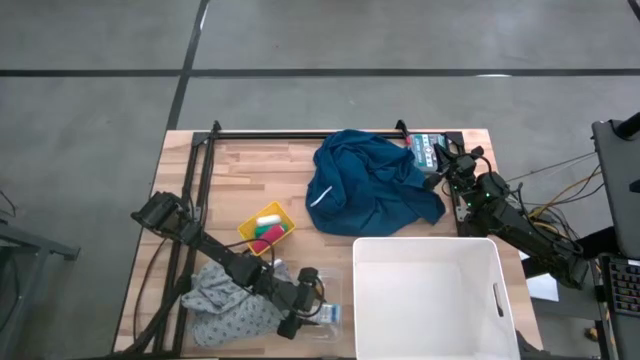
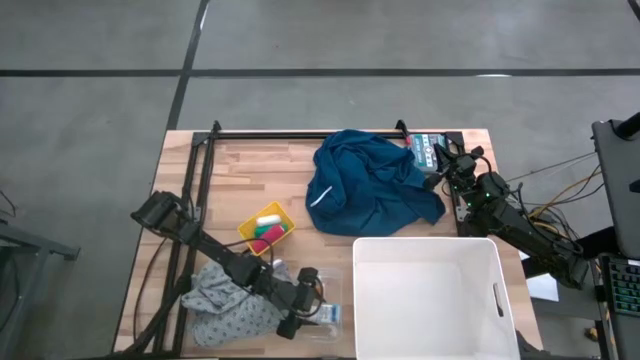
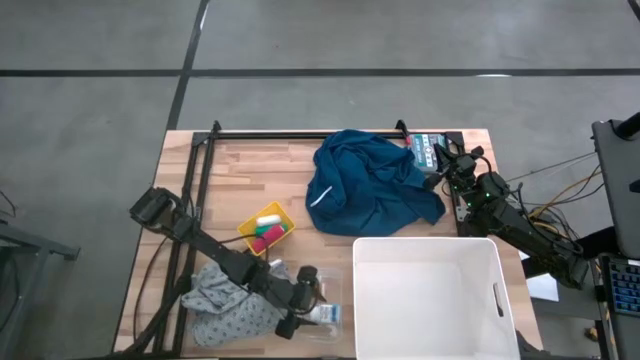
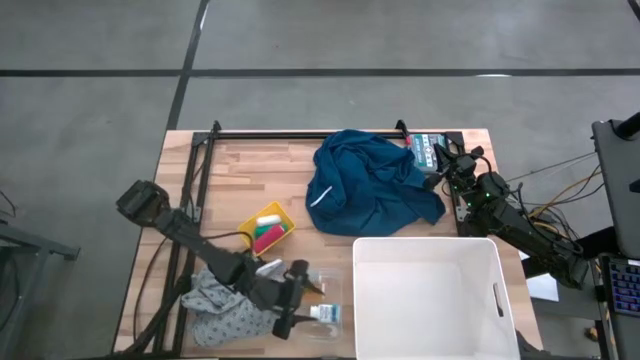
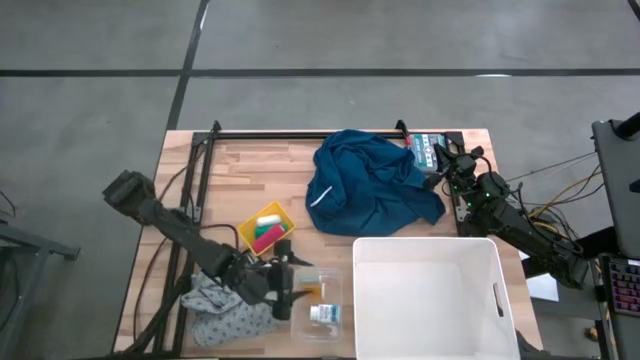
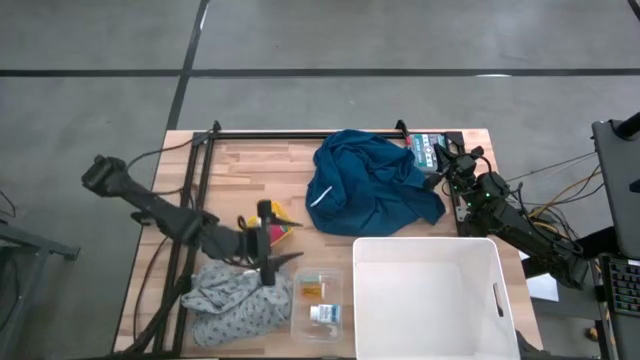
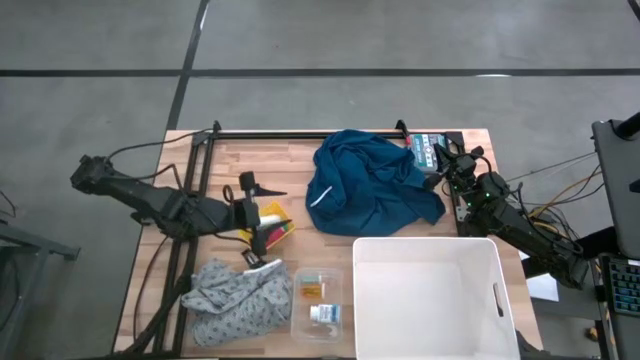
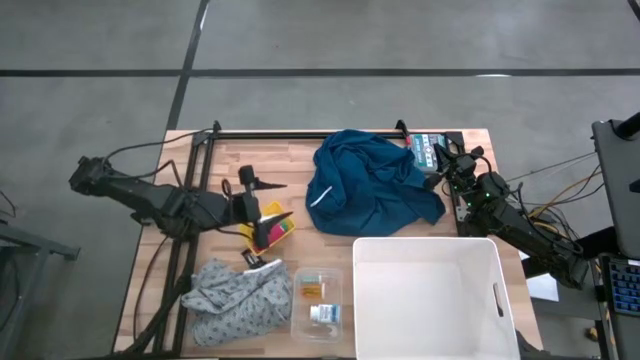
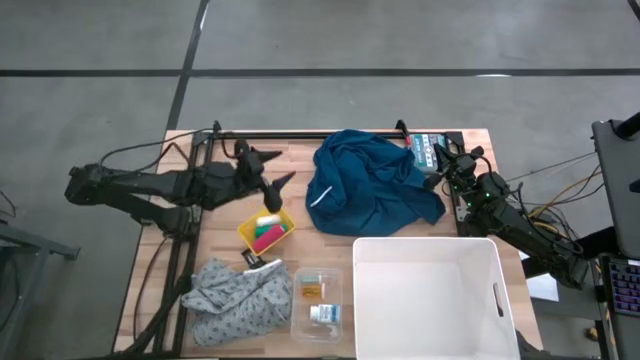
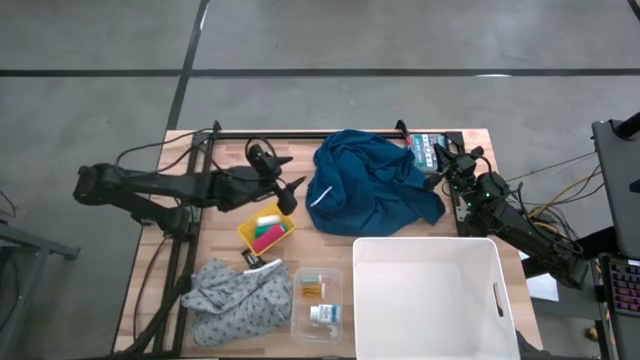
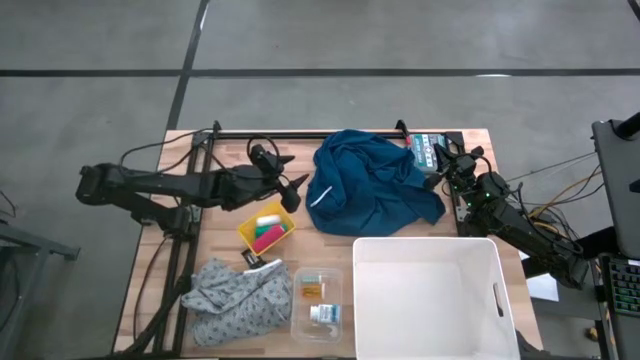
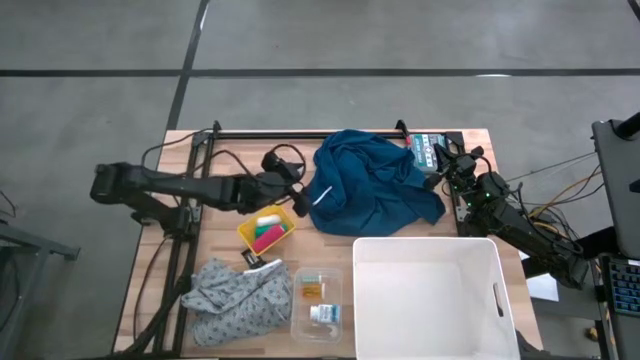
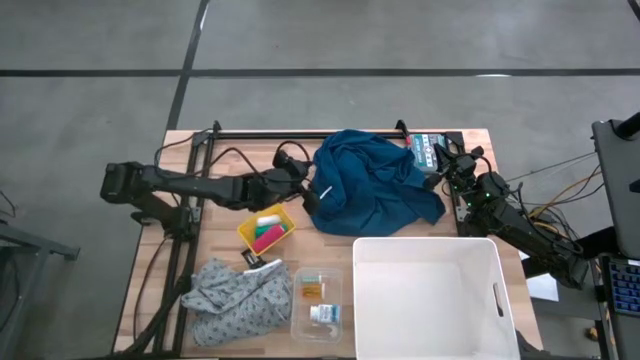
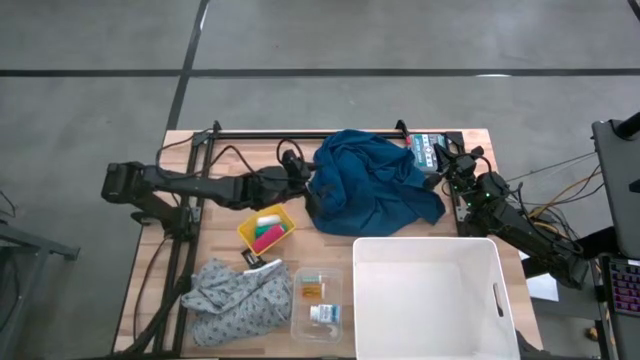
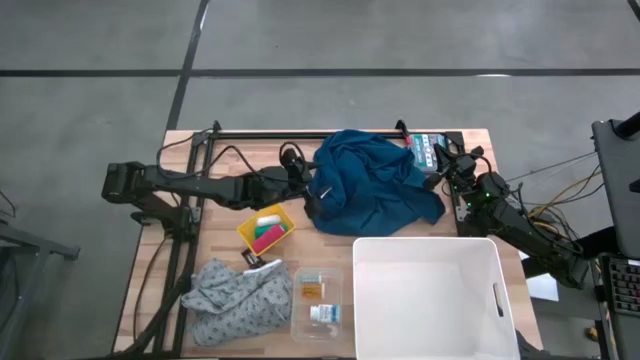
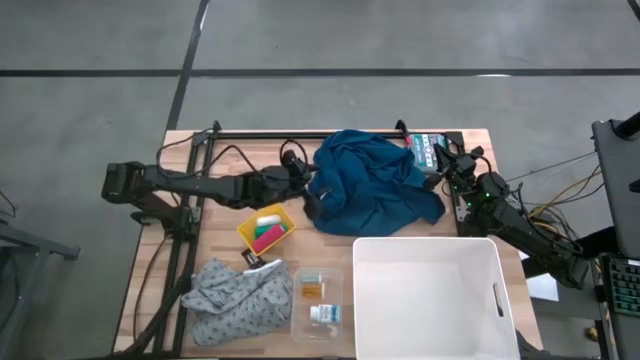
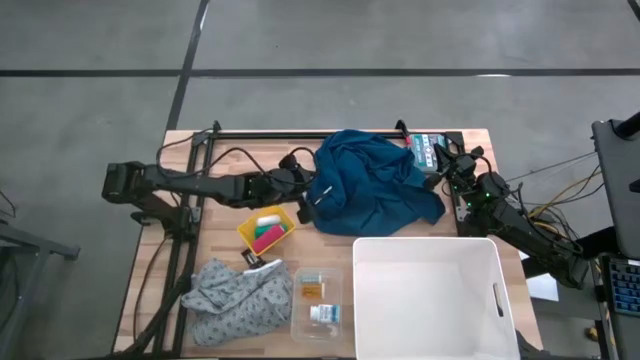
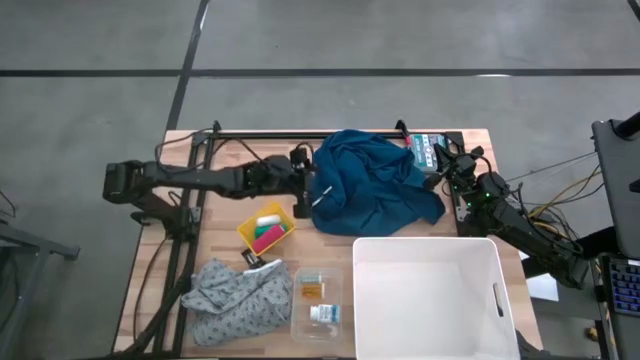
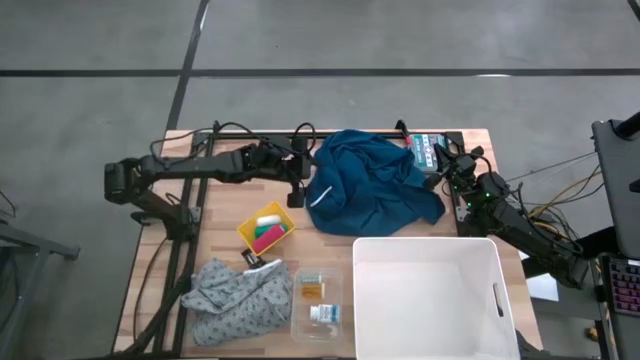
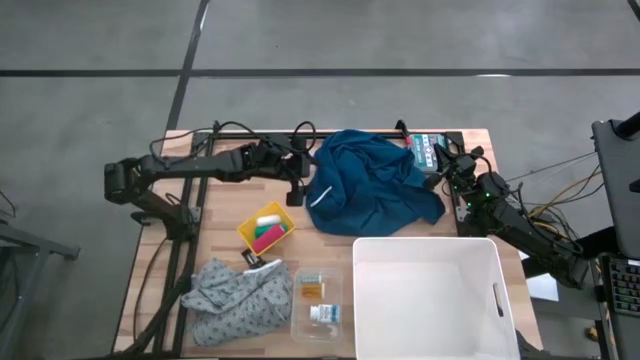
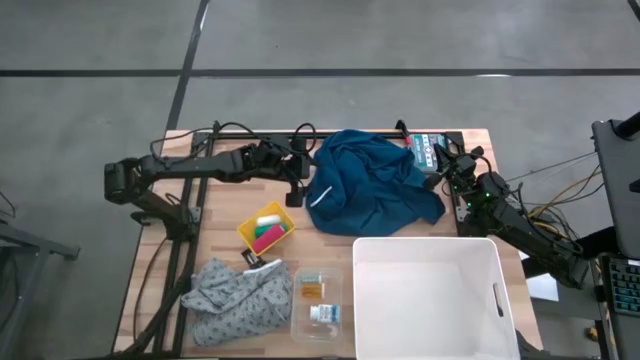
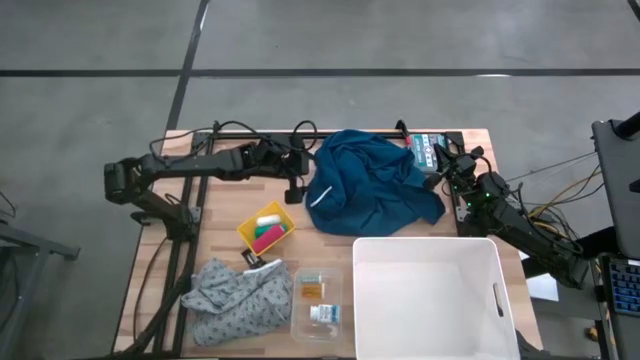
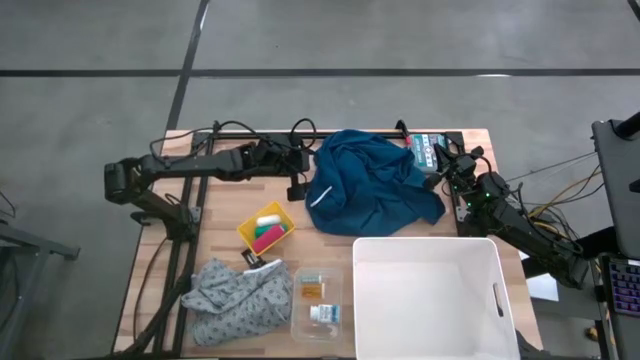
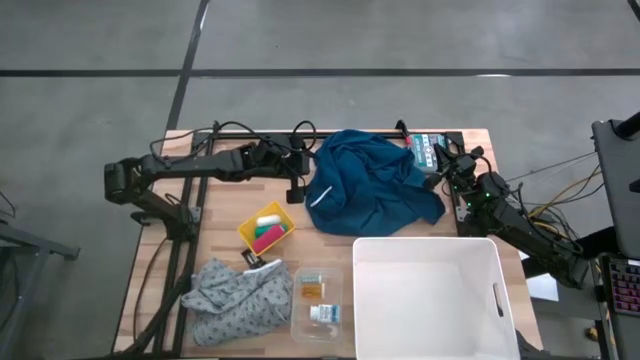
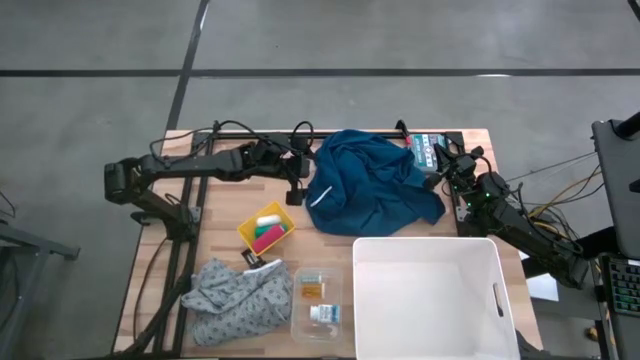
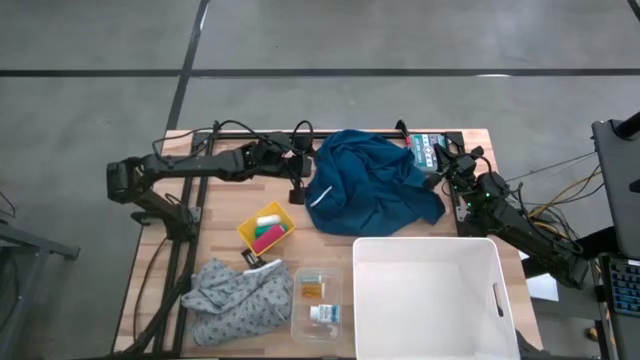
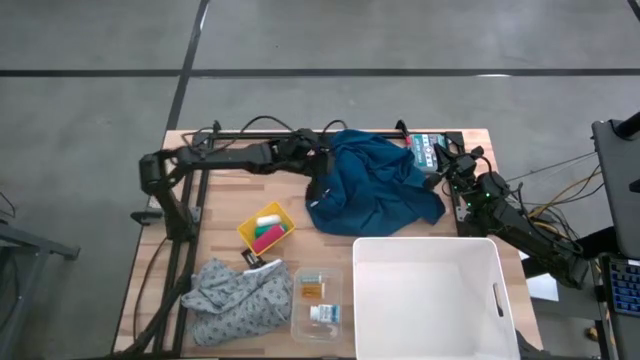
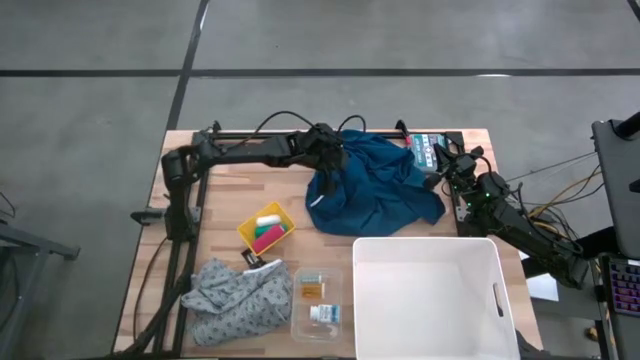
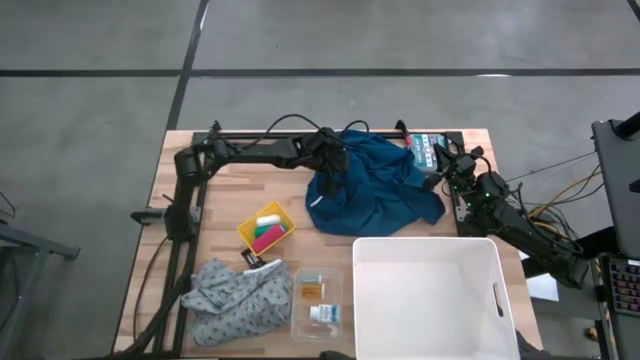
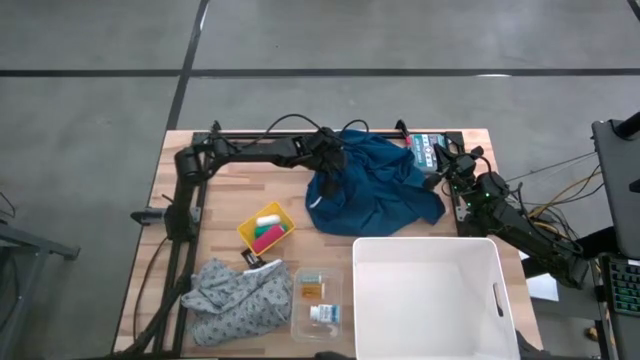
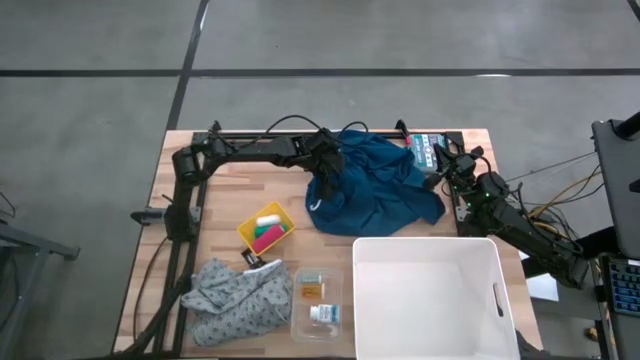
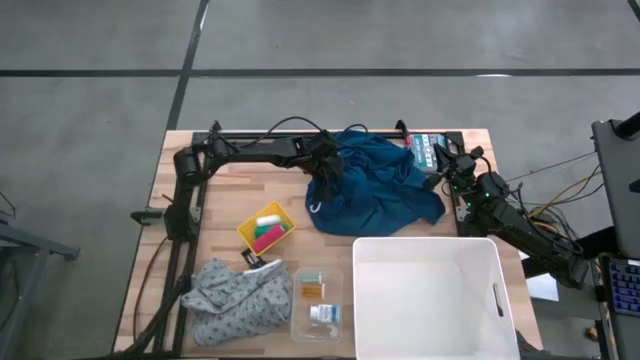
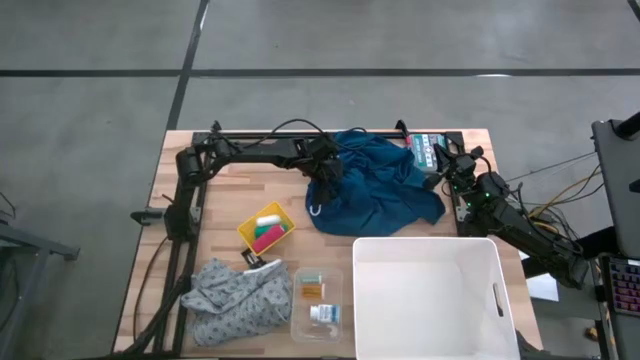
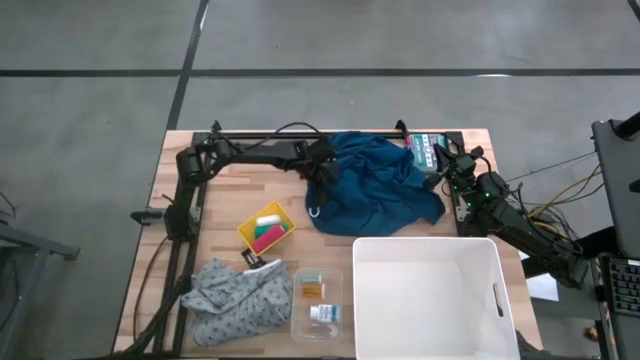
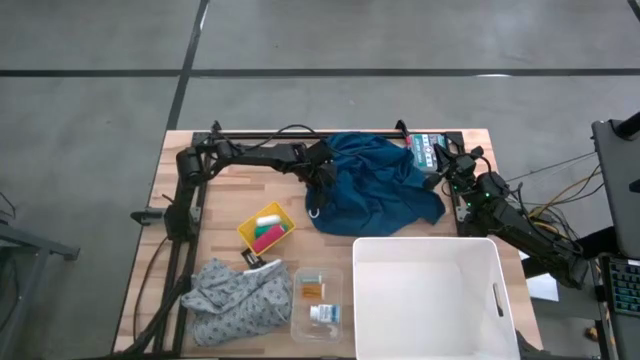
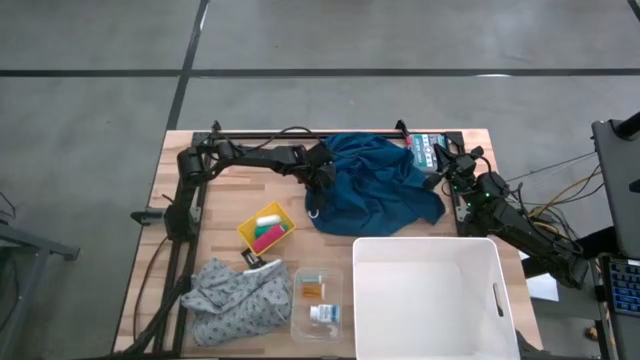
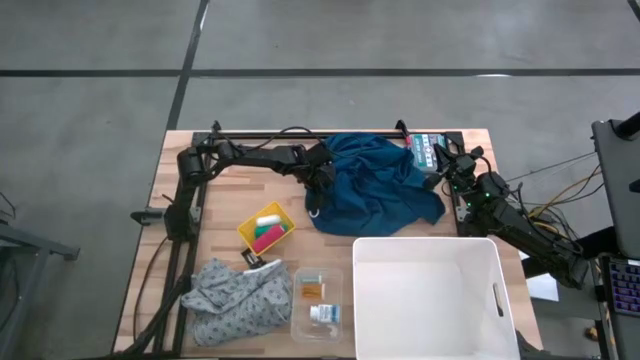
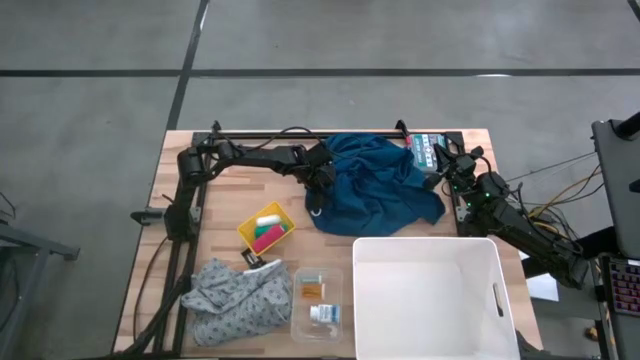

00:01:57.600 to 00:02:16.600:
Task: Pick & Place Medicine items
Put the blue patient gown into the white laundry bin

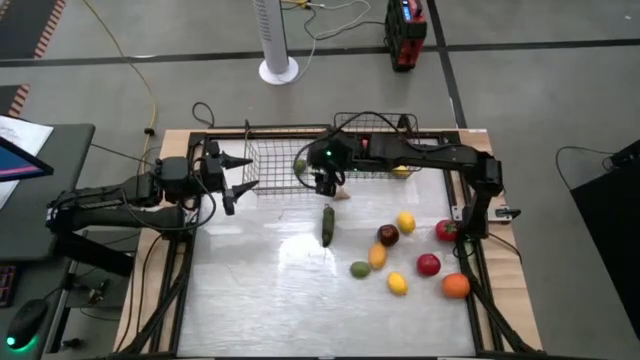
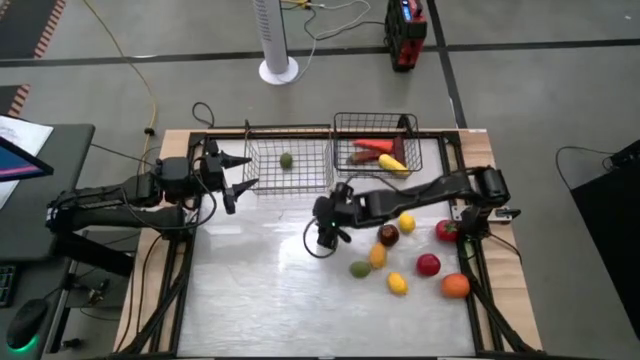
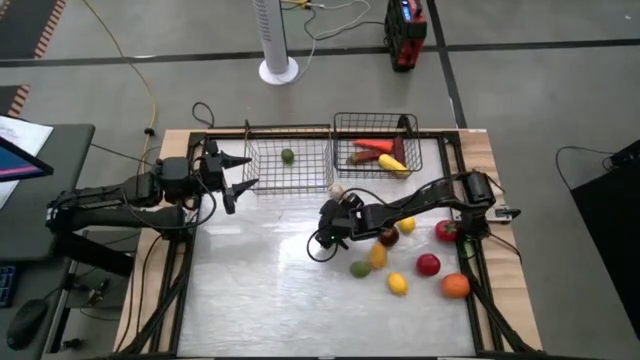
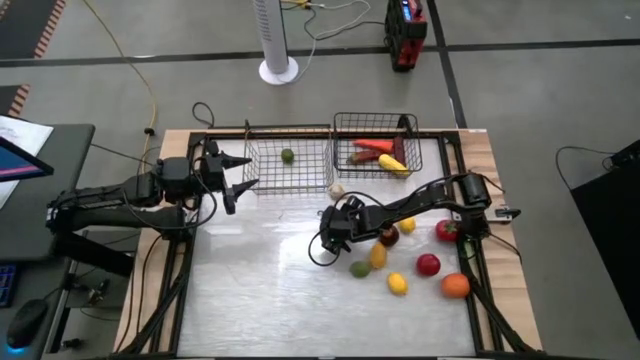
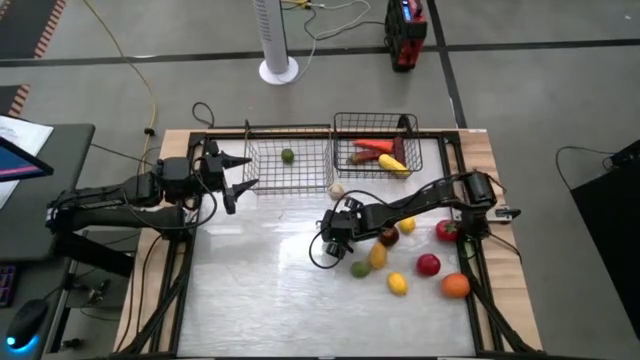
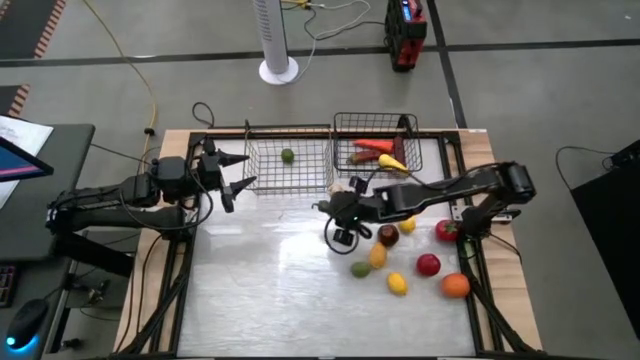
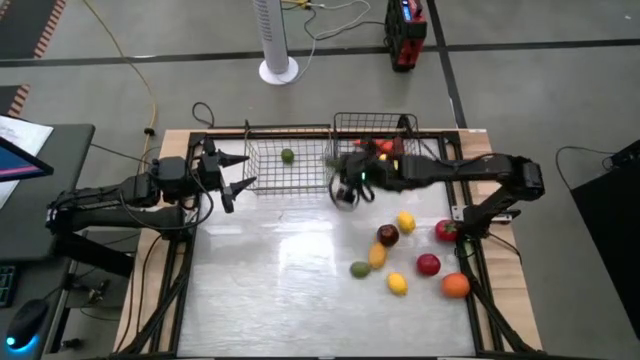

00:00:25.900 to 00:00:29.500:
Task: Sort produce into baskets
Put the green chili pepper into the right wire basket
